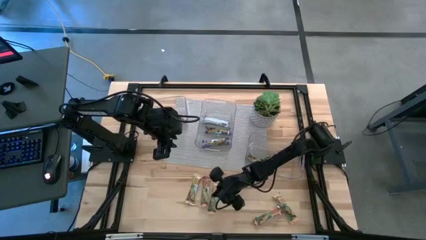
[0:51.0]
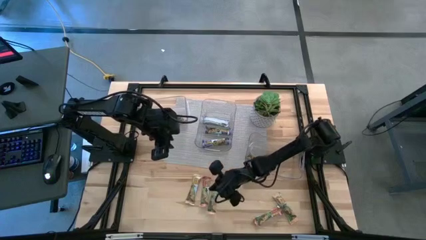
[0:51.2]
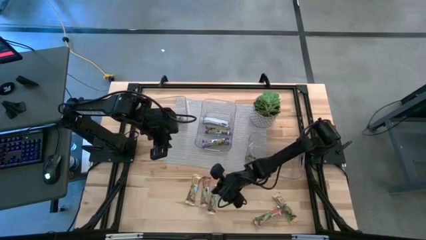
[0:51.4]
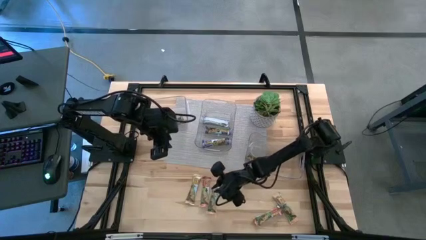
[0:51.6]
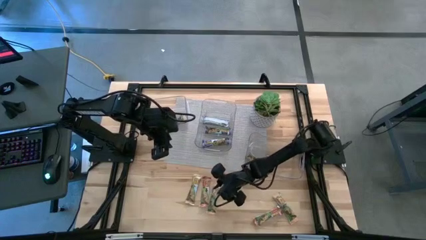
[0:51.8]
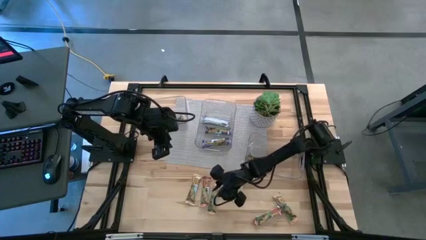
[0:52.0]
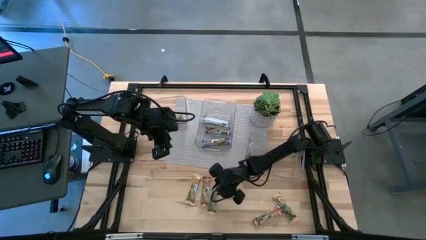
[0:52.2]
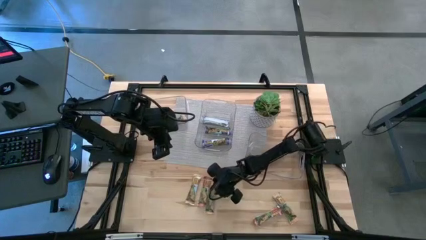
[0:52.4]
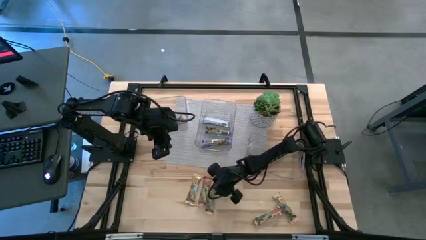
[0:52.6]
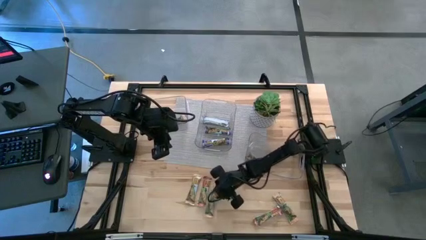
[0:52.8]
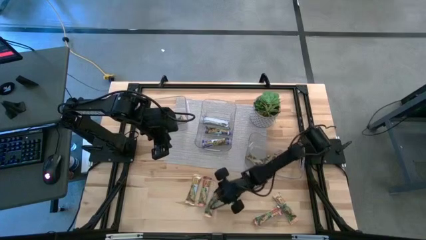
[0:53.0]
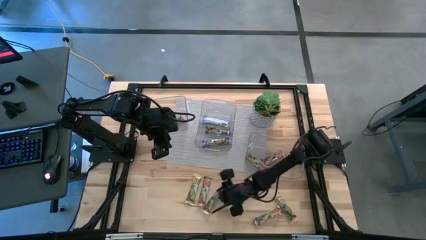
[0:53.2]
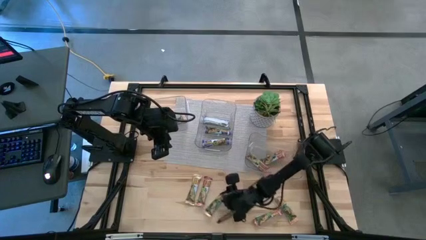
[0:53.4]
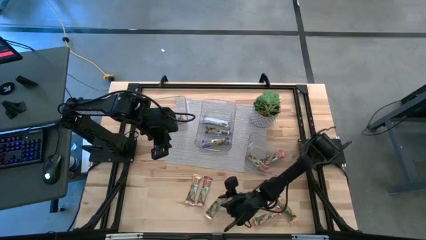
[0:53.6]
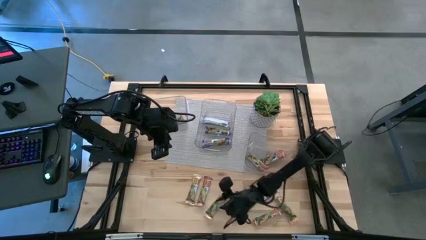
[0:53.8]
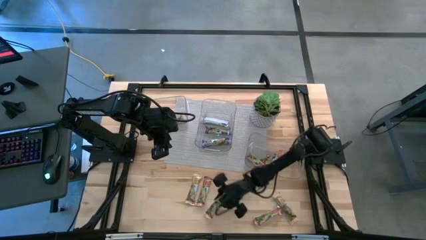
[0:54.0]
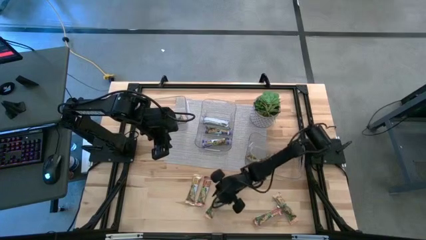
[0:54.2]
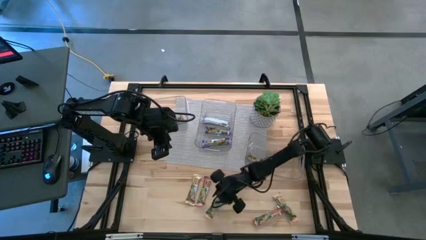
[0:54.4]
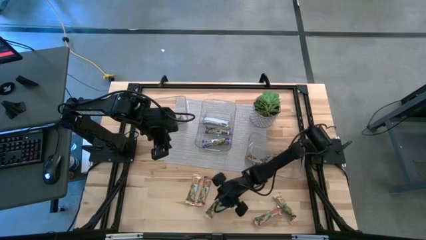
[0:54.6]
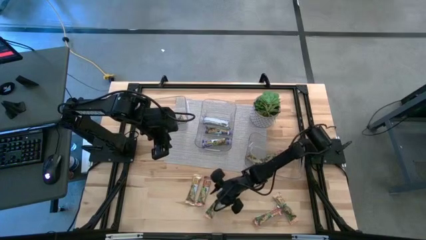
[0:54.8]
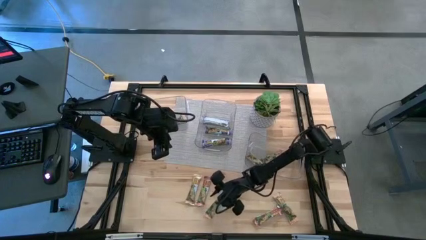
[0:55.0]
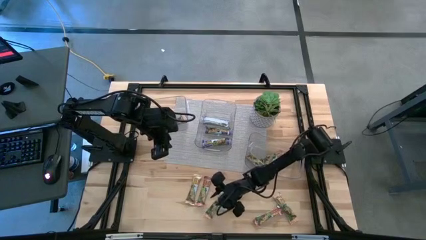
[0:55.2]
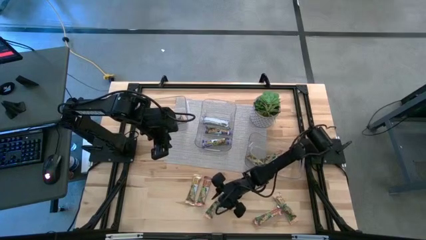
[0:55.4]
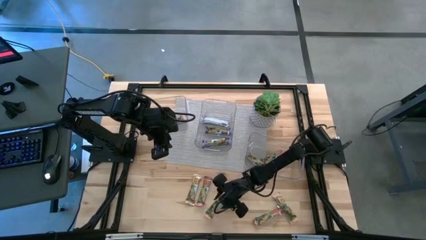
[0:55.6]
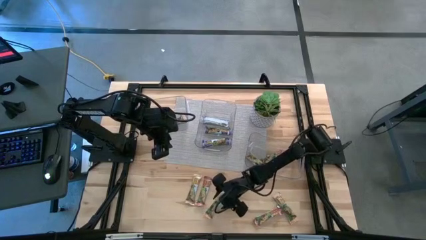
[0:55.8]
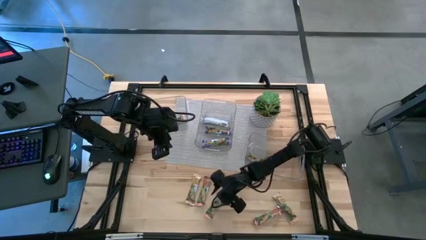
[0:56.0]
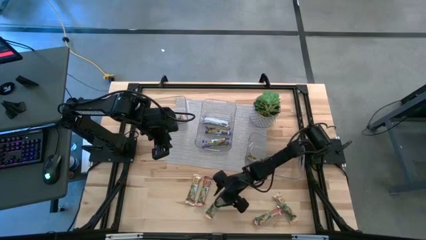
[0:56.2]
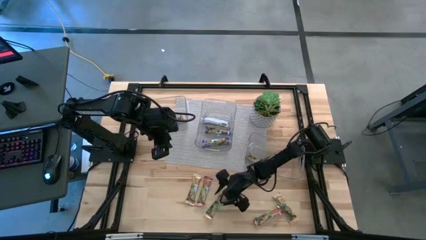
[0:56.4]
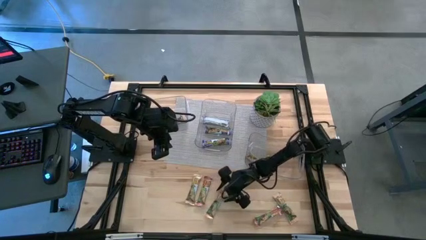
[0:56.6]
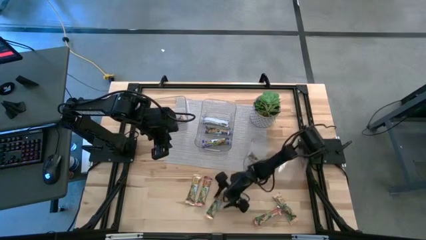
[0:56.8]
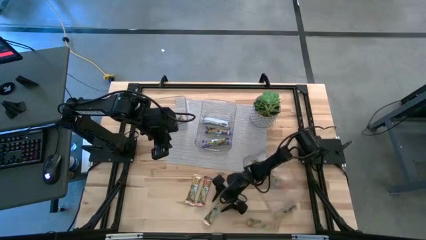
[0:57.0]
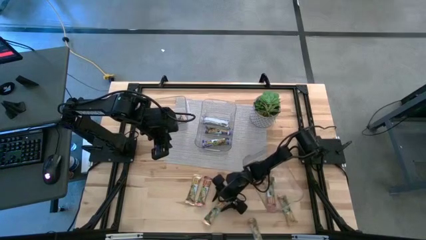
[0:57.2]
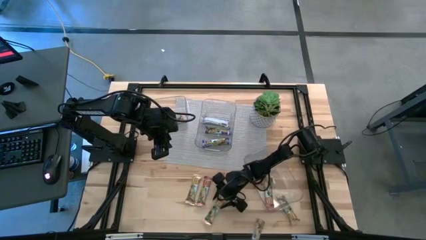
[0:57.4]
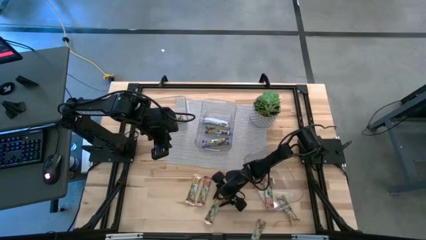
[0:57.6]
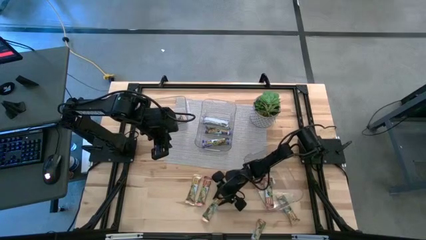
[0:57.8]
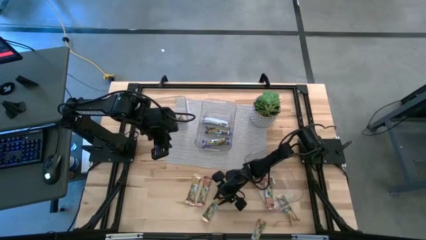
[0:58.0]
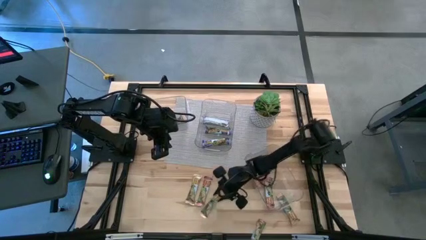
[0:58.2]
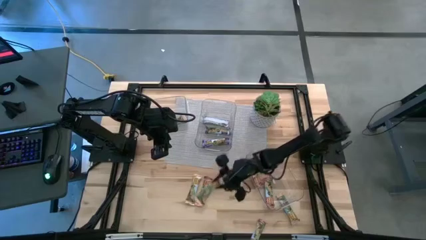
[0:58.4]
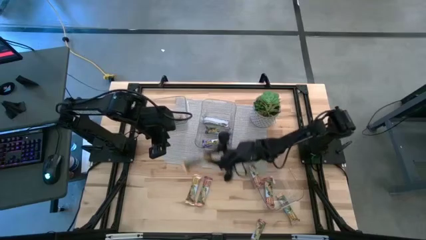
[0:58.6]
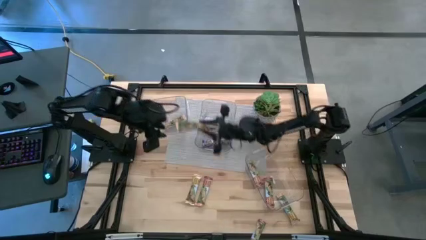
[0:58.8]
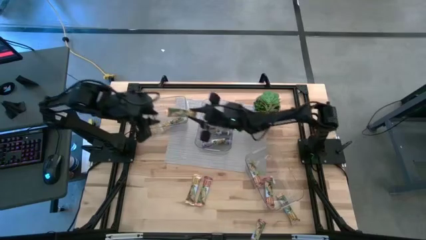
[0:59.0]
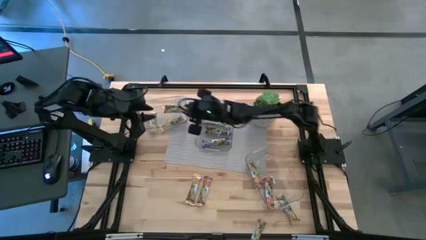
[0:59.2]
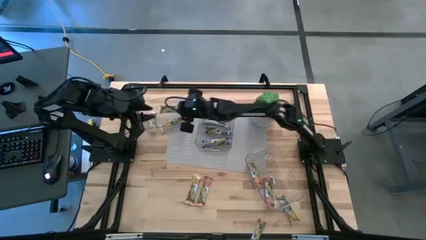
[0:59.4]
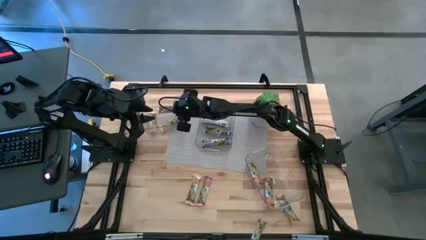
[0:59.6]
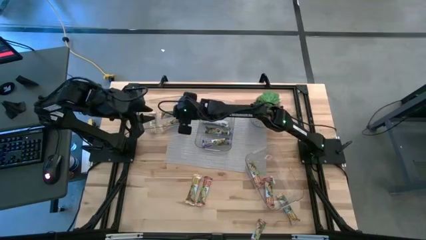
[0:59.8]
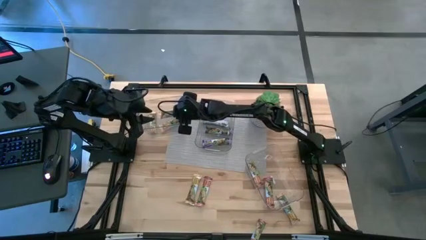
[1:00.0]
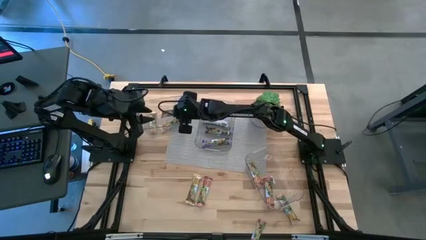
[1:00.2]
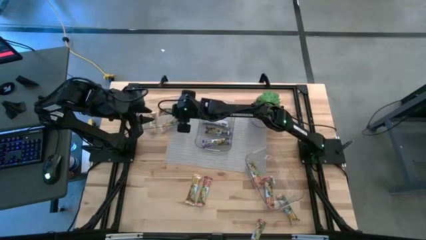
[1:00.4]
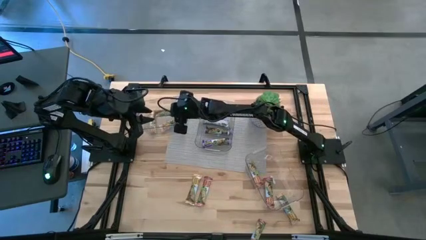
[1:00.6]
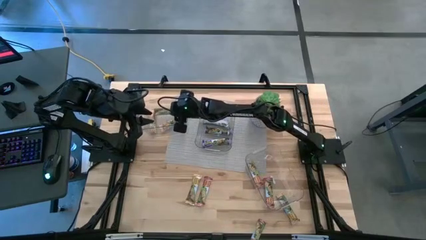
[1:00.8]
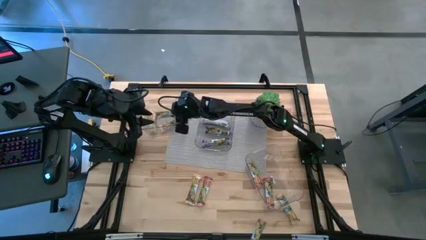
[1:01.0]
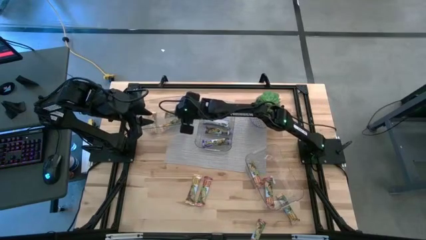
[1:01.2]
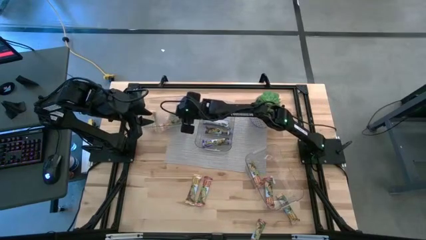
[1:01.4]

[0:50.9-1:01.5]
Task: Pick and place Granola Bars by type
Put the yellow granola bar into the left transparent bin

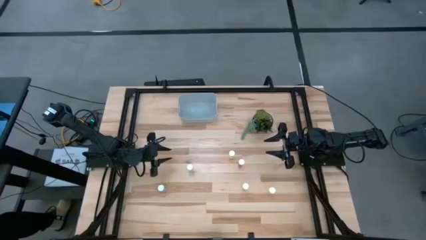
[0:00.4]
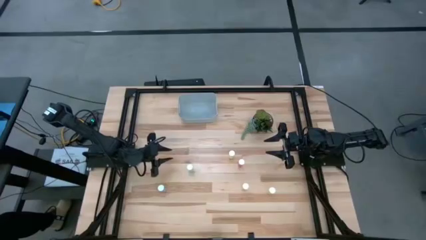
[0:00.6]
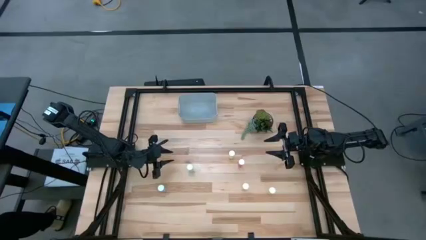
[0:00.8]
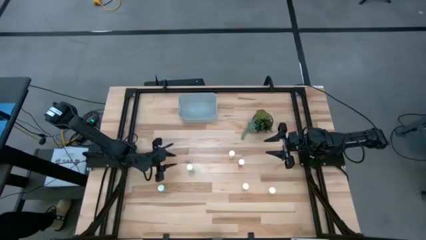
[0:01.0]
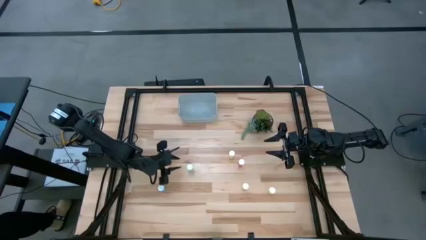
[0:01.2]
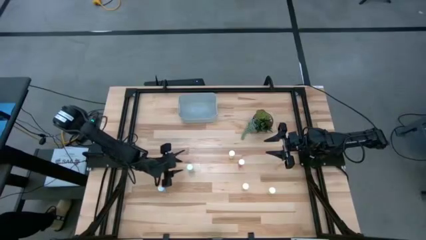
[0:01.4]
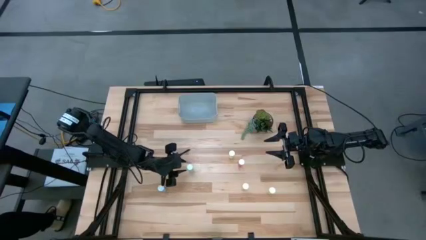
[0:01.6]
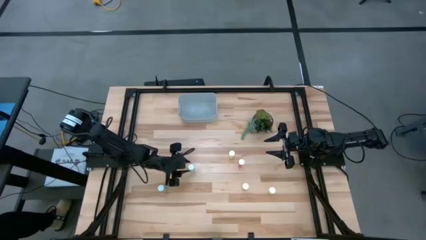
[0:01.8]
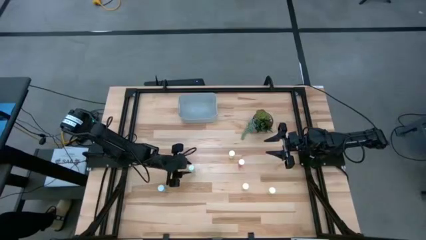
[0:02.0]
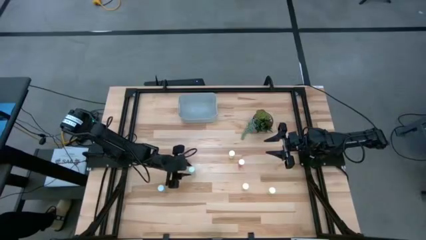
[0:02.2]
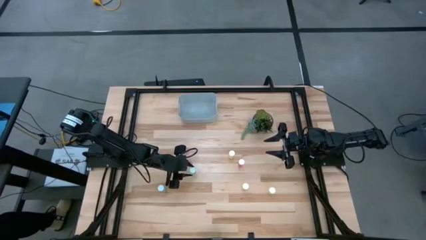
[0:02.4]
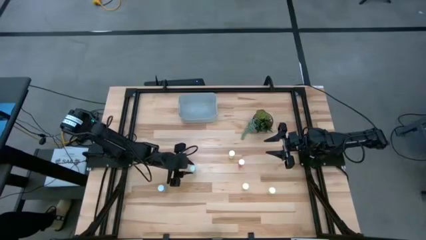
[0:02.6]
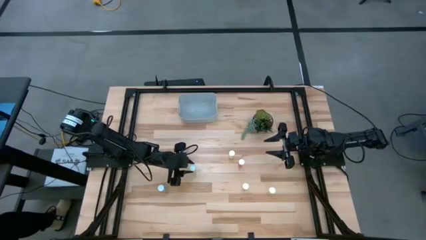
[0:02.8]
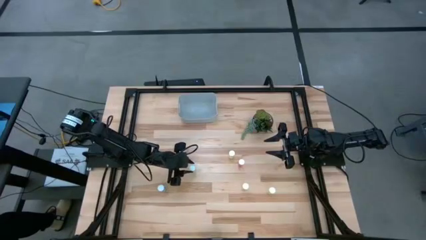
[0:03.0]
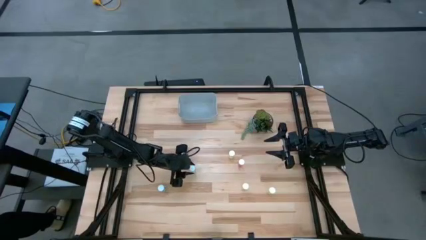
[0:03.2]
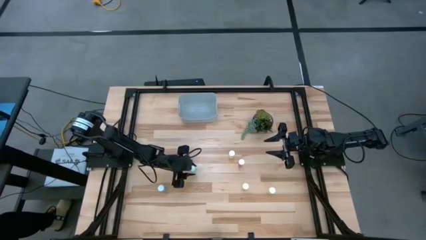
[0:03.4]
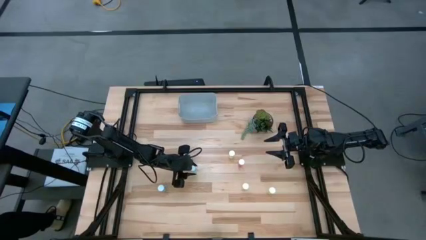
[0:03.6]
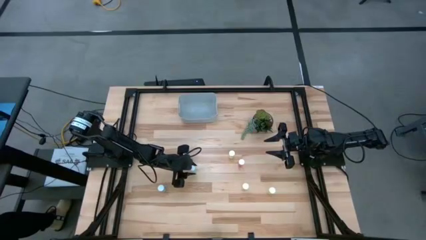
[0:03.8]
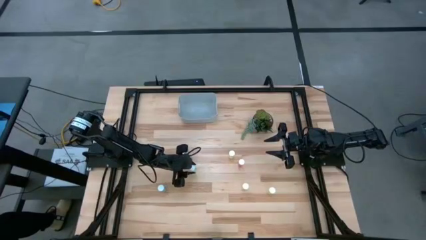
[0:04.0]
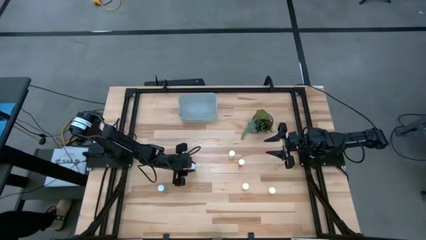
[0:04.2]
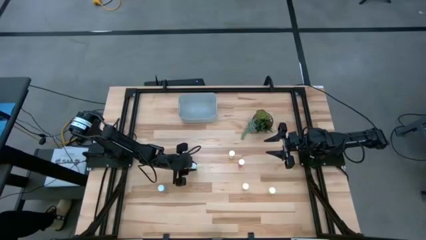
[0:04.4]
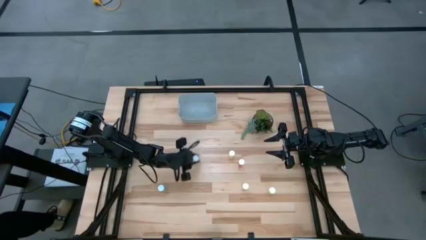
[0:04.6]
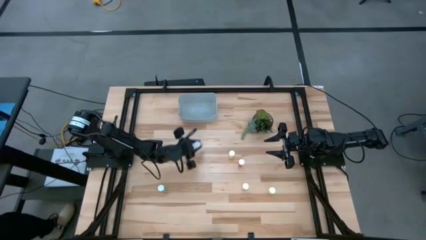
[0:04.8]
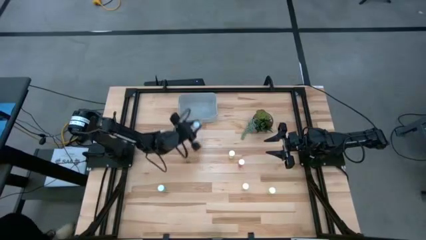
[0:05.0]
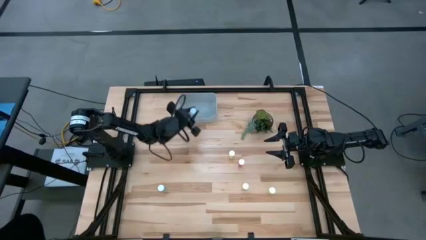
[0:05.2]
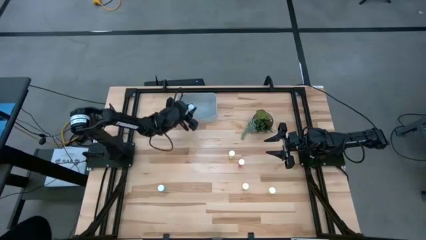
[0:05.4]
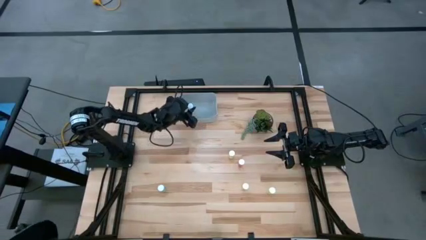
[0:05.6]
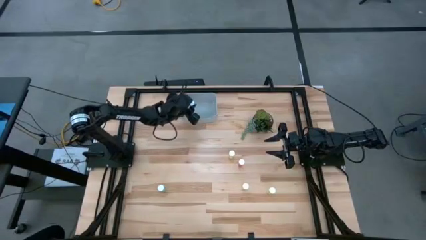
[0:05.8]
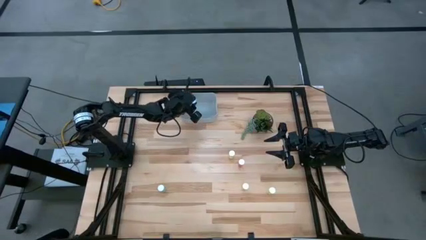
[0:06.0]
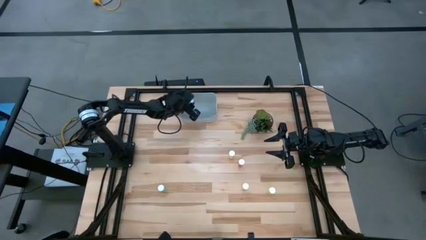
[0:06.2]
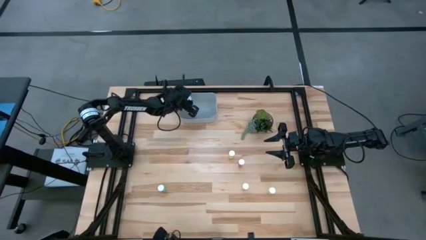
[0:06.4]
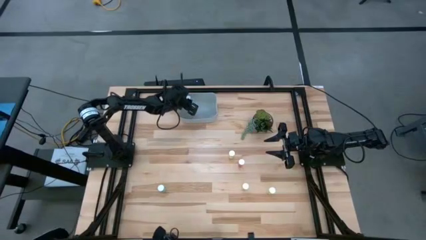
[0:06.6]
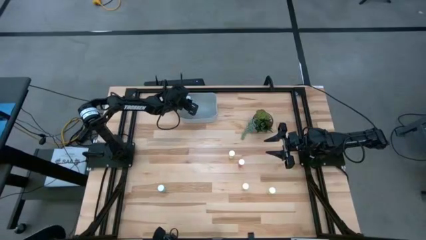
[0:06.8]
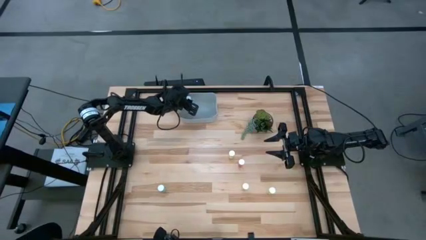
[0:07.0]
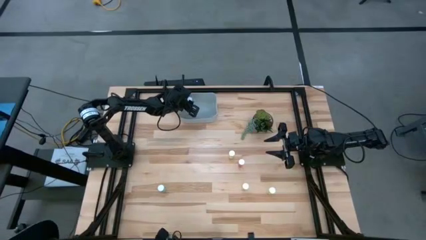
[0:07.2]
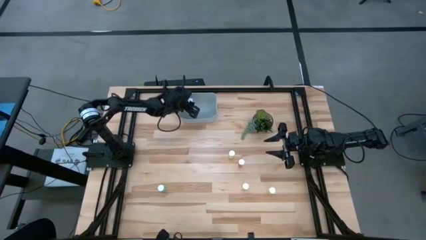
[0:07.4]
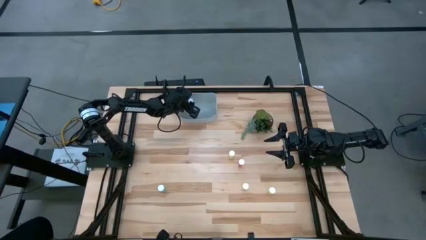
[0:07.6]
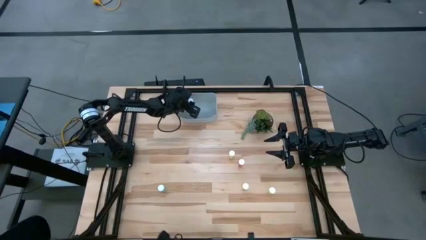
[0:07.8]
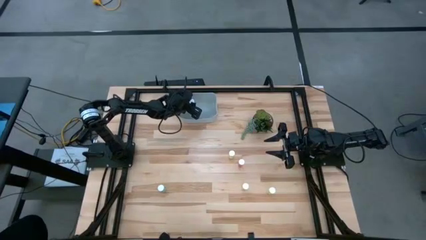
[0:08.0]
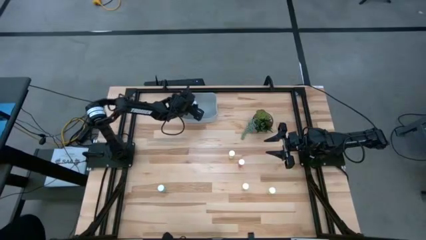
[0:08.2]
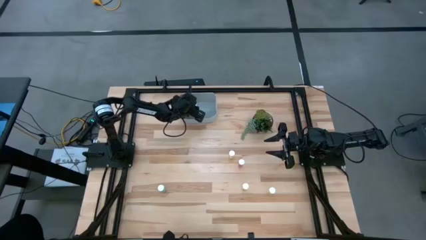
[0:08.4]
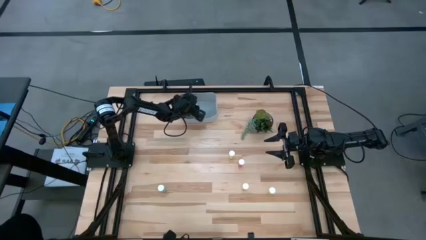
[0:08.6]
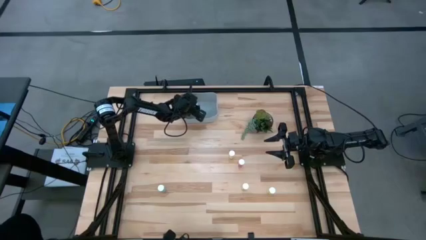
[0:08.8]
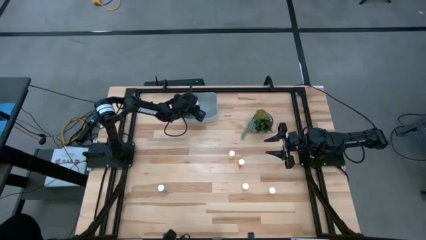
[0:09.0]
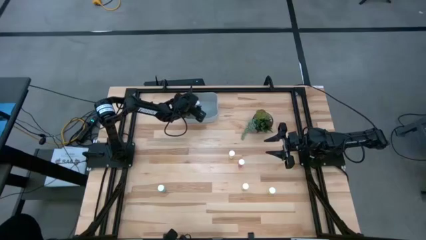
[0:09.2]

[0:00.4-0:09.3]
Task: Pick and place pill bottles into a basket
Put the right green pill bottle into the gray container
